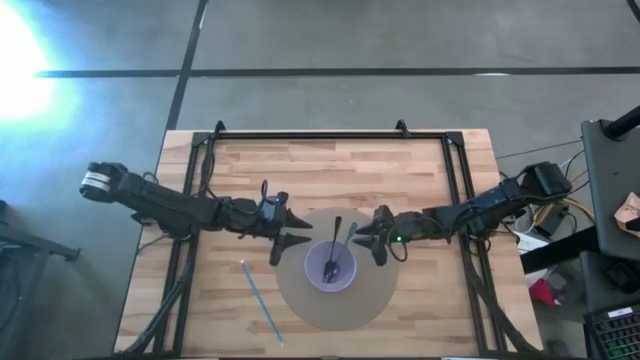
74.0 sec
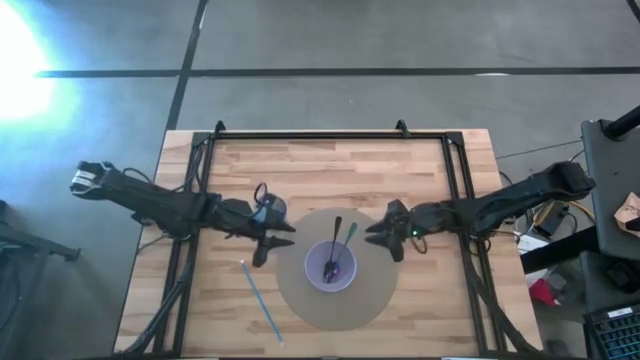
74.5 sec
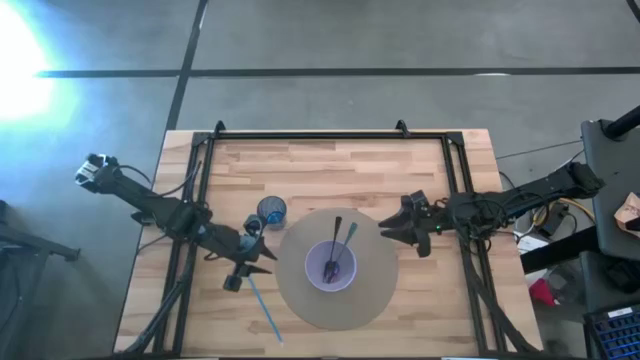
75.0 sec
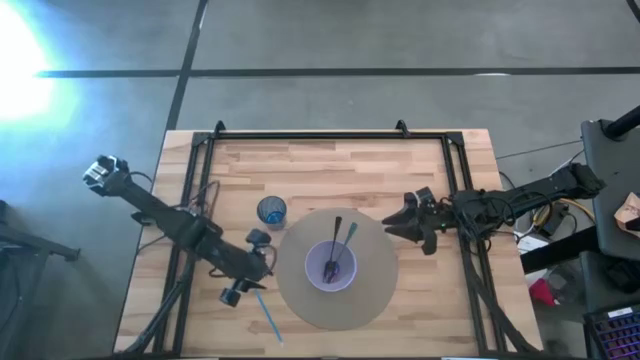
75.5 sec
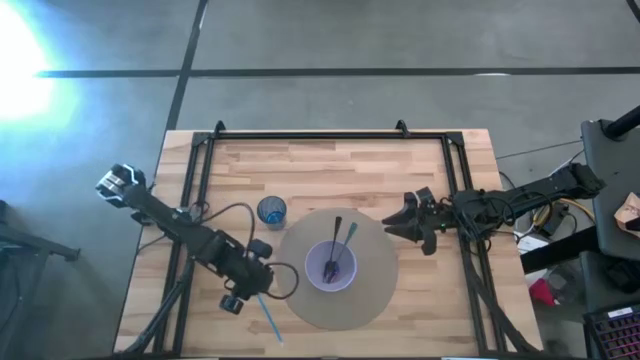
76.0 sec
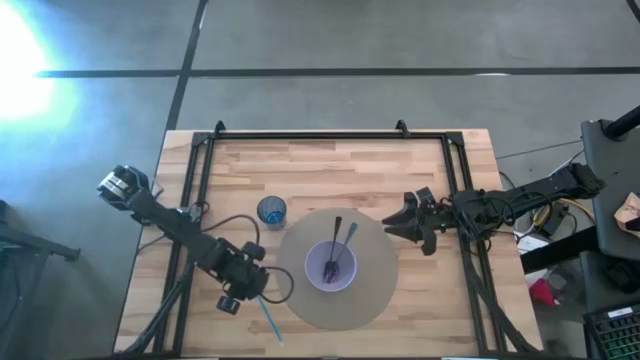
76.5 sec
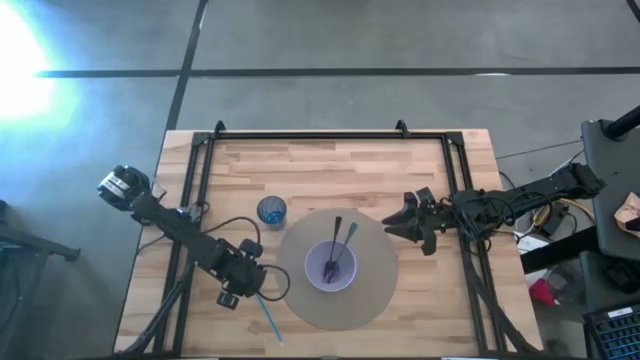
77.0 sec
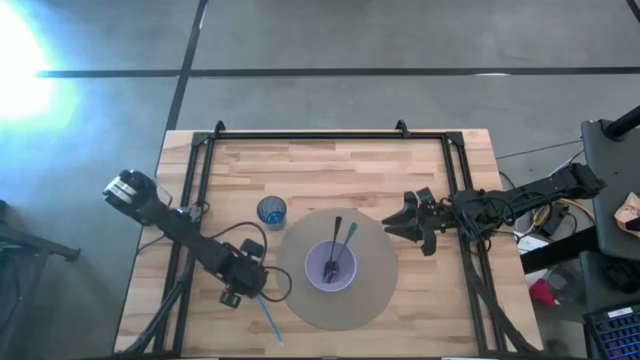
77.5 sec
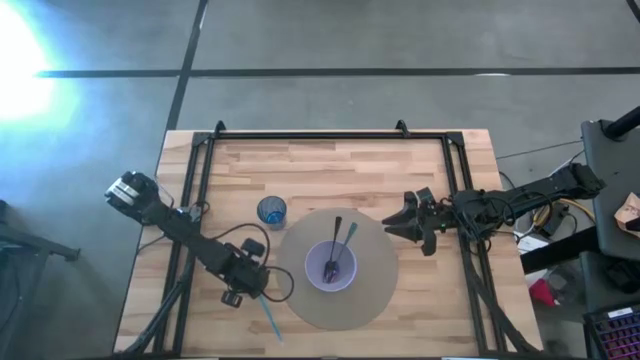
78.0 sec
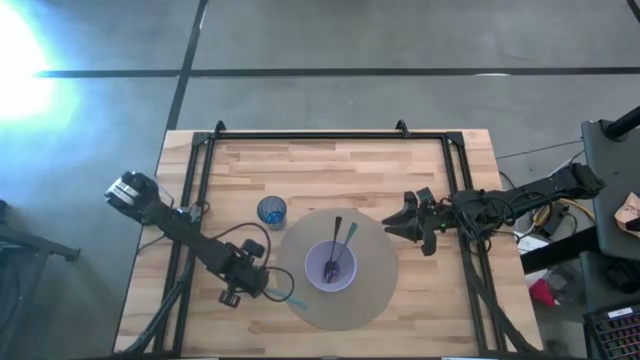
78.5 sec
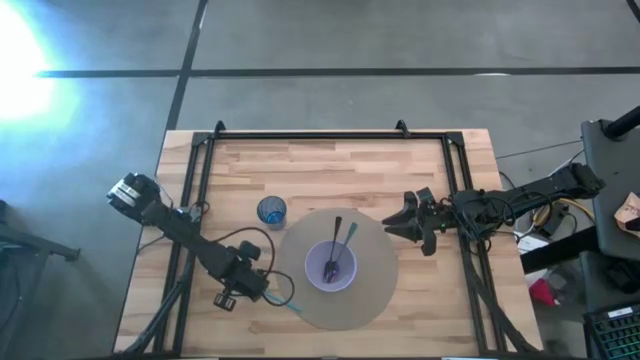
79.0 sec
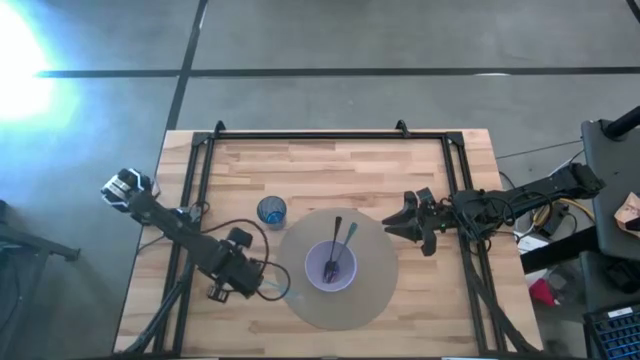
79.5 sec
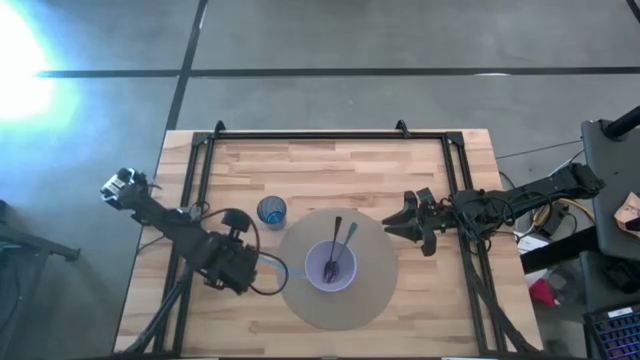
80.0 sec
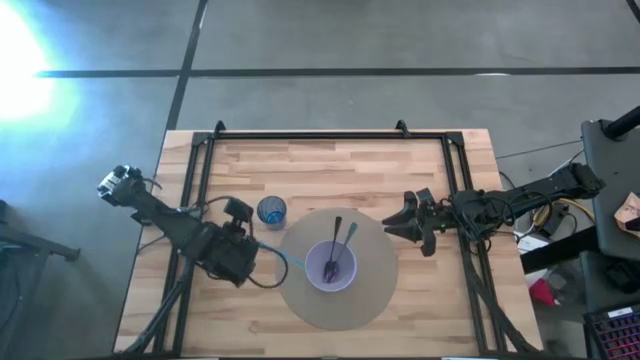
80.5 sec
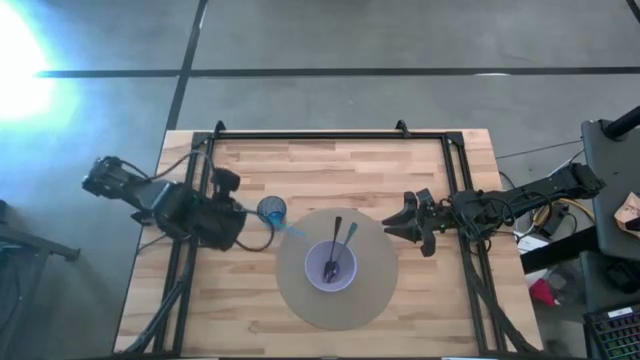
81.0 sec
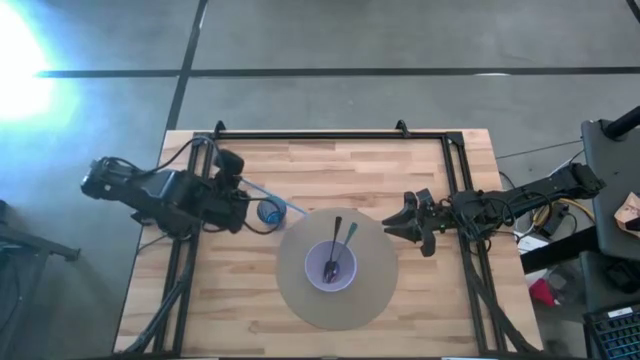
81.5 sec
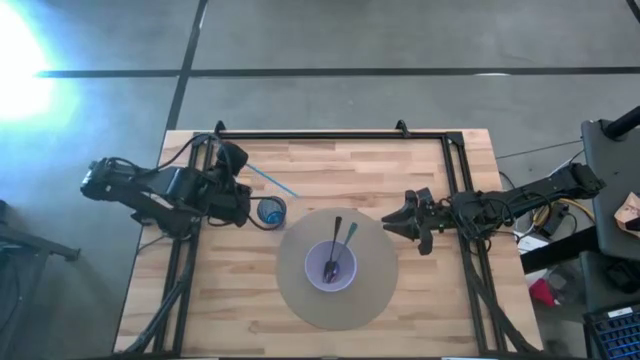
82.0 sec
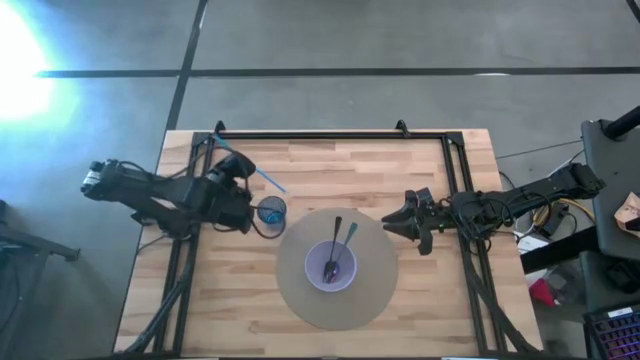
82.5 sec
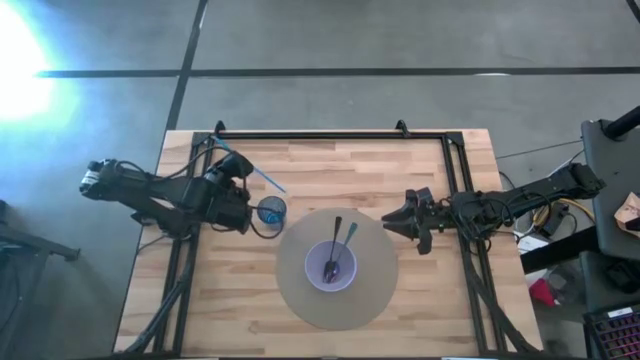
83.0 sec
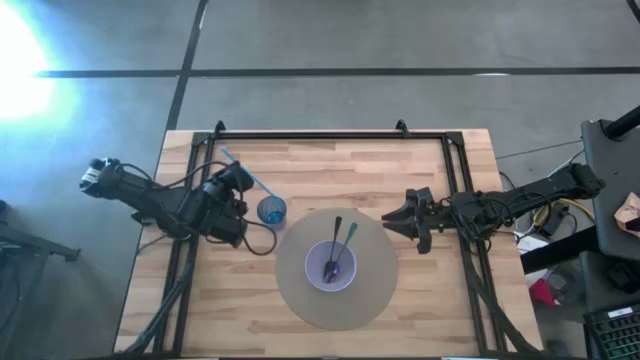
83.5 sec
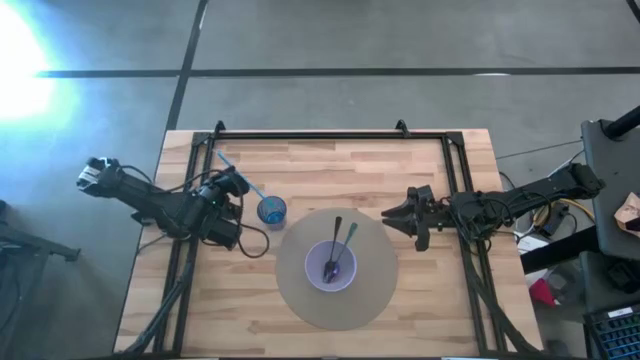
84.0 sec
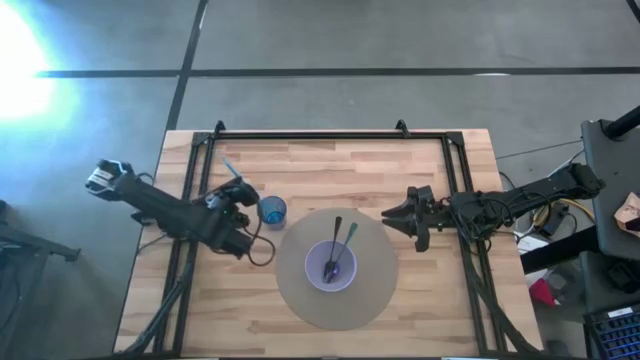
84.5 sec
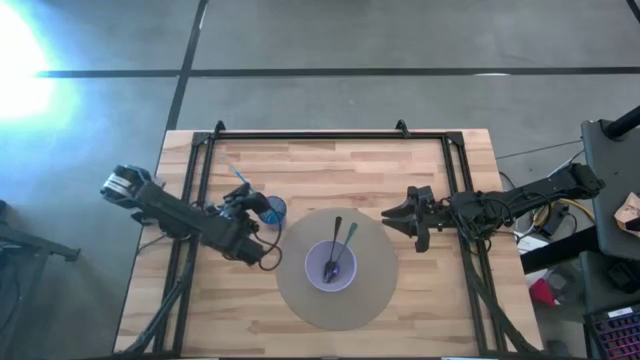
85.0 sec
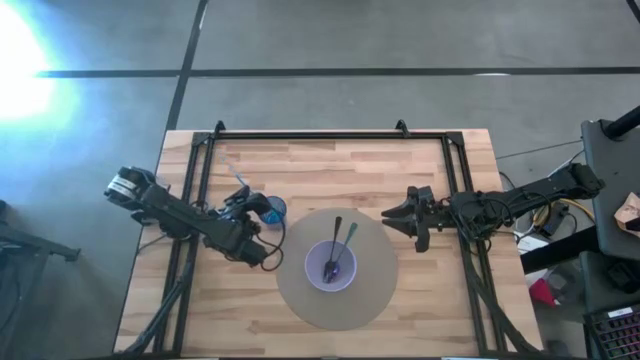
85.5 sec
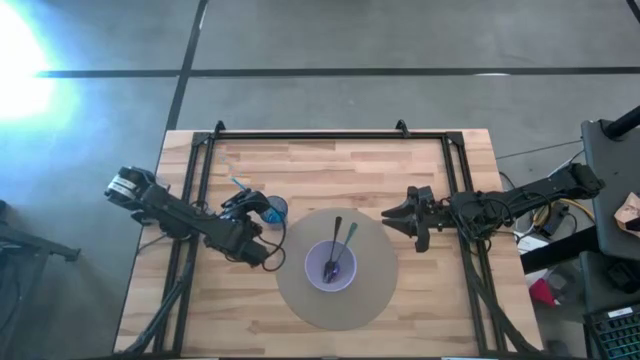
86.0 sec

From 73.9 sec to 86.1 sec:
Task: Pick & Place Utensil
Put the blue straw into the blue glass

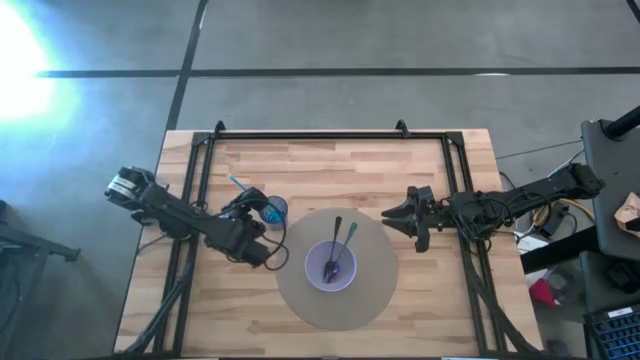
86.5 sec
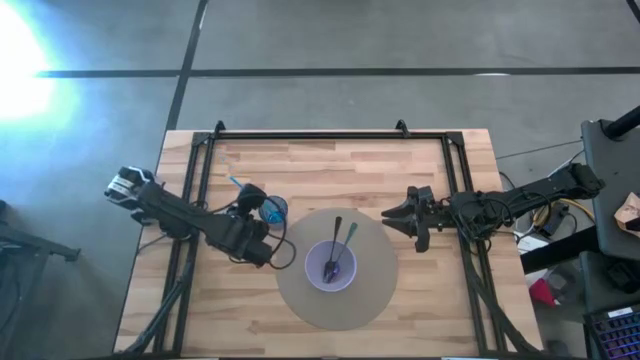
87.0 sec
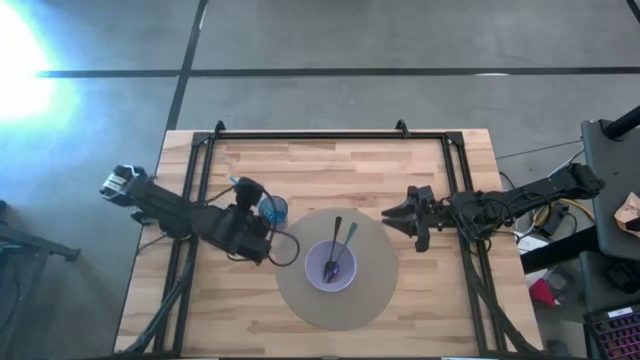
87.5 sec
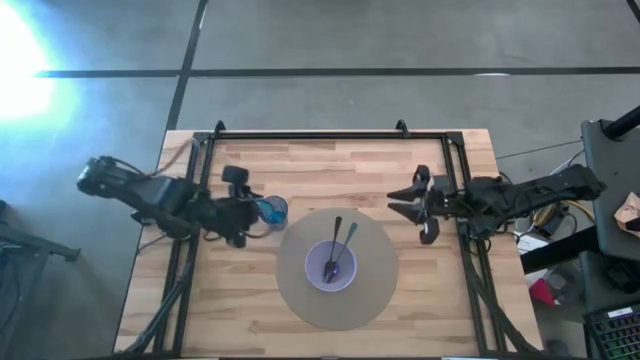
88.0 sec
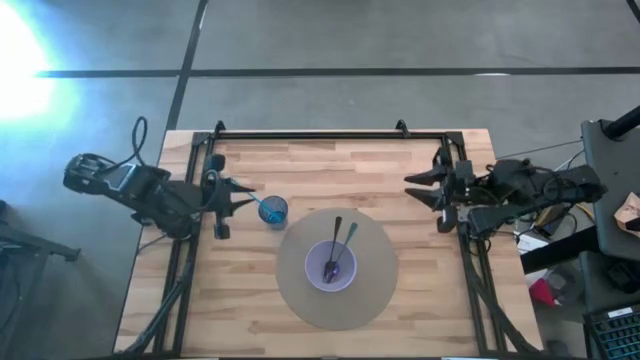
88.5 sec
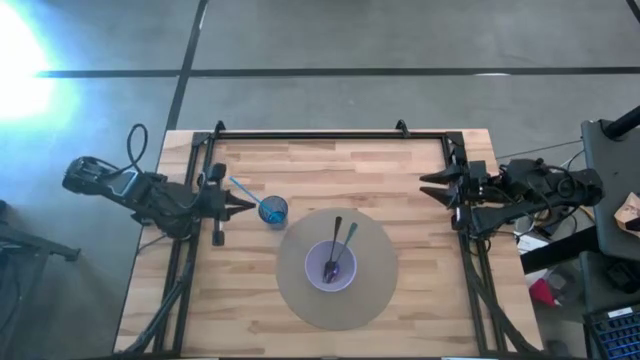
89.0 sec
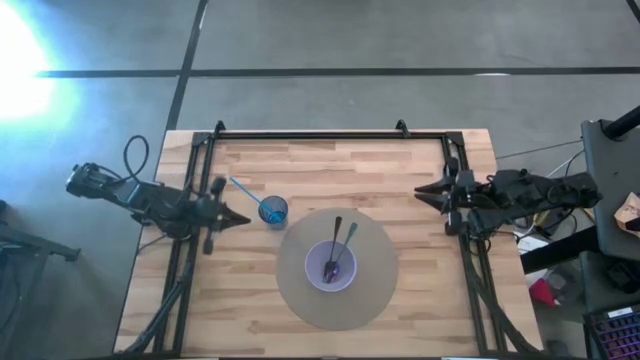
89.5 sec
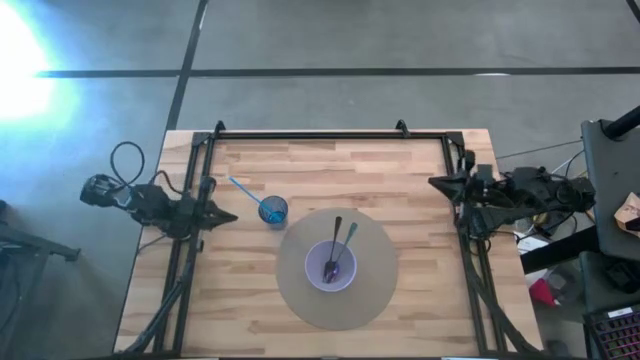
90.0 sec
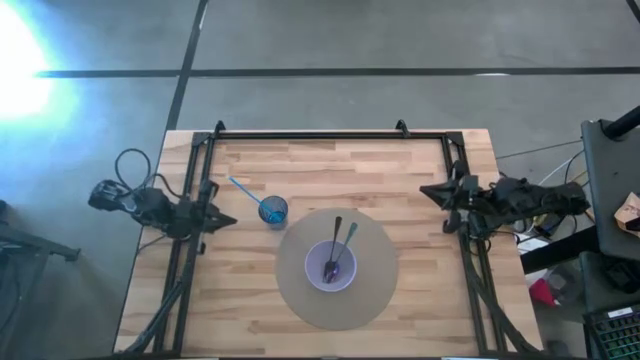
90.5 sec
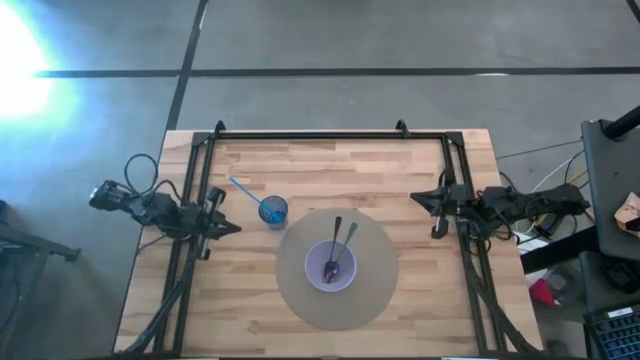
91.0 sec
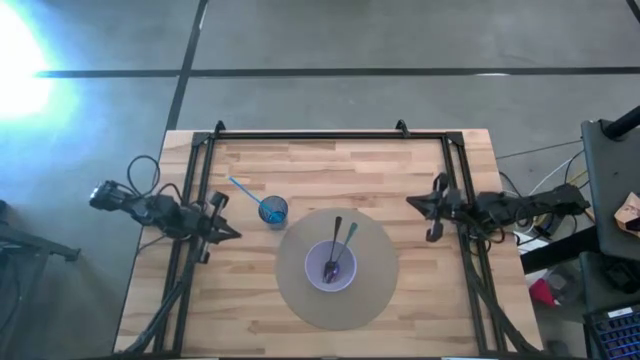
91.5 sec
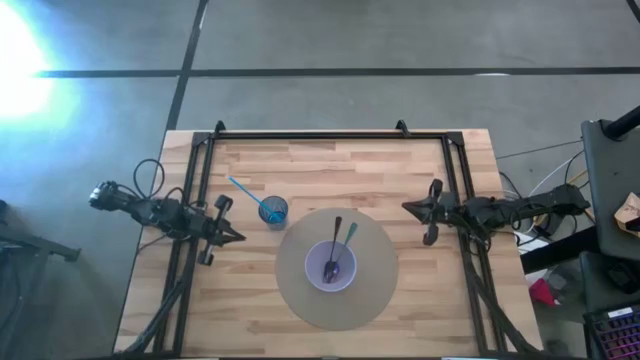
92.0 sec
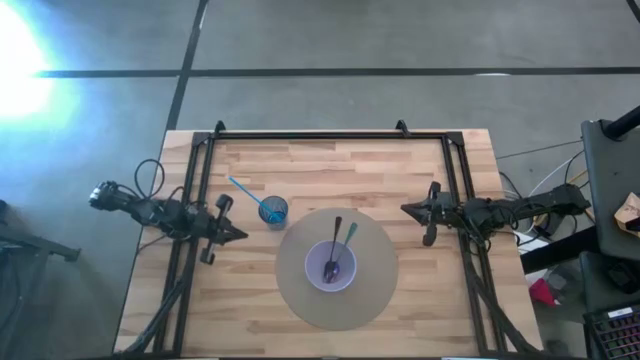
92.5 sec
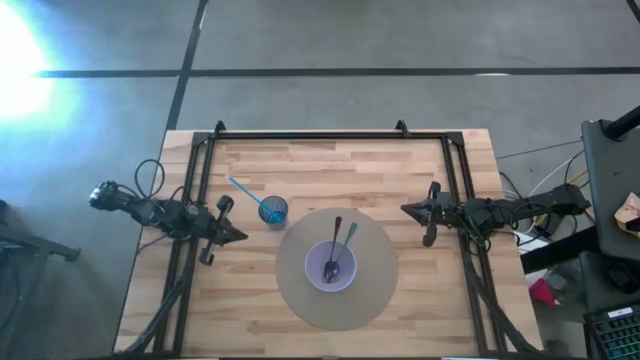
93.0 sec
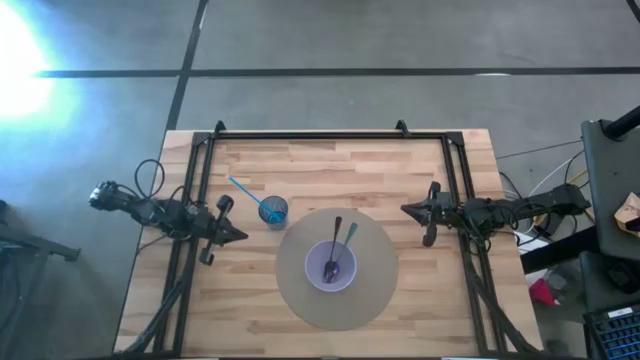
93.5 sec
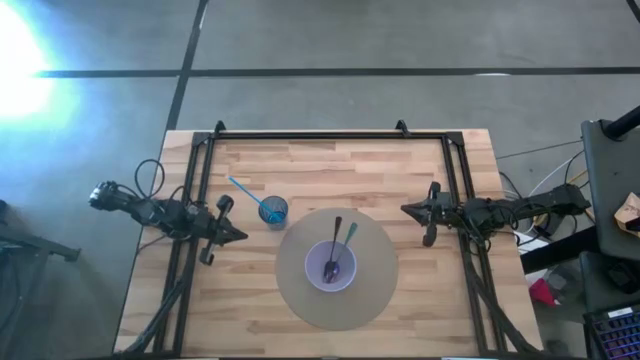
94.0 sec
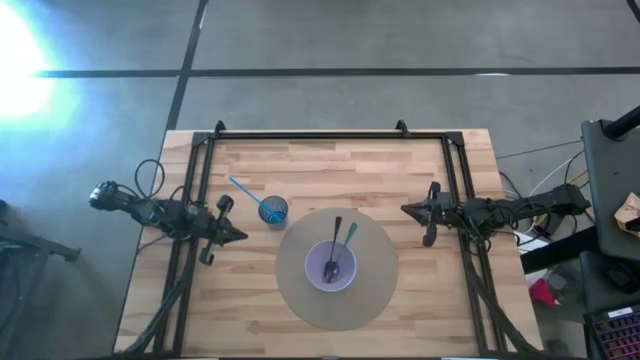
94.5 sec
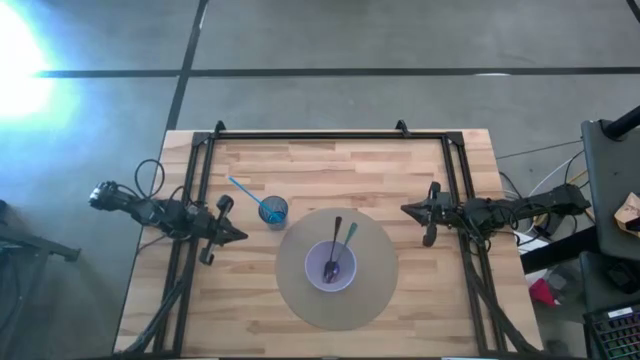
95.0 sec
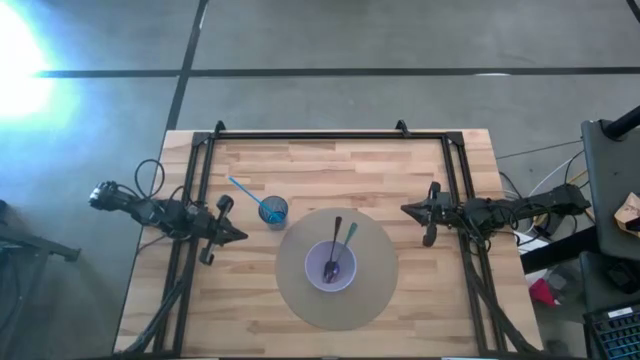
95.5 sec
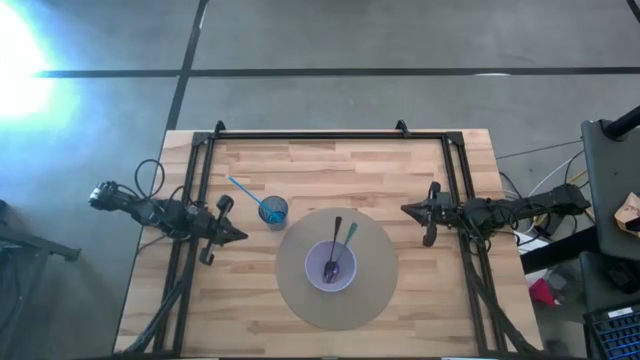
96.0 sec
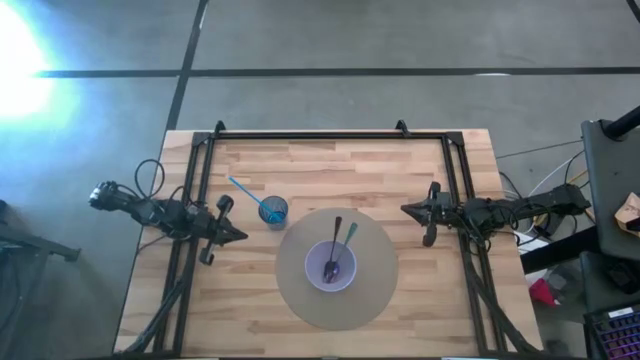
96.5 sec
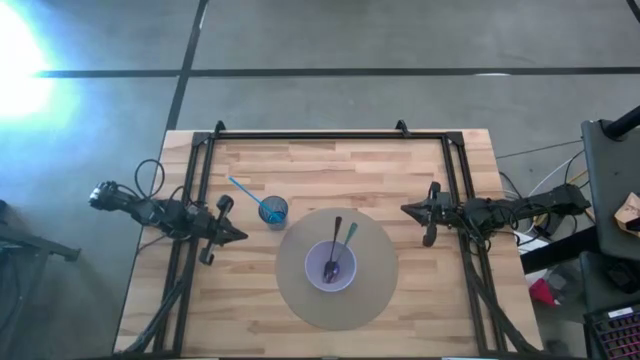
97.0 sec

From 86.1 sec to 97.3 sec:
Return to Home Position
